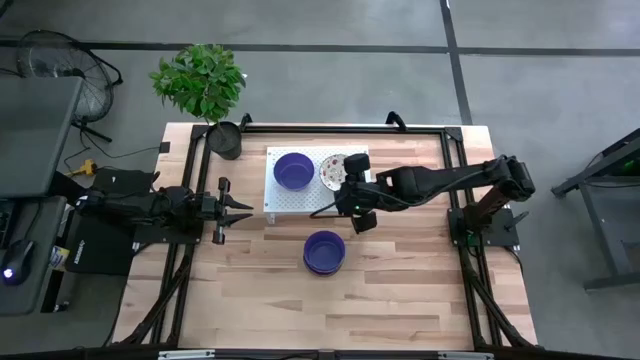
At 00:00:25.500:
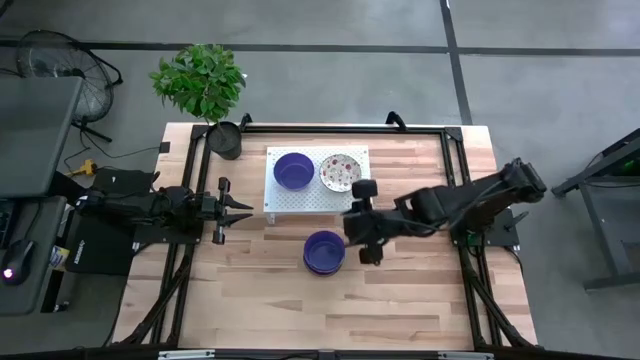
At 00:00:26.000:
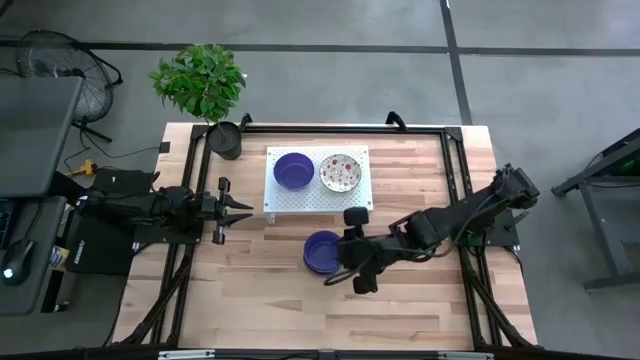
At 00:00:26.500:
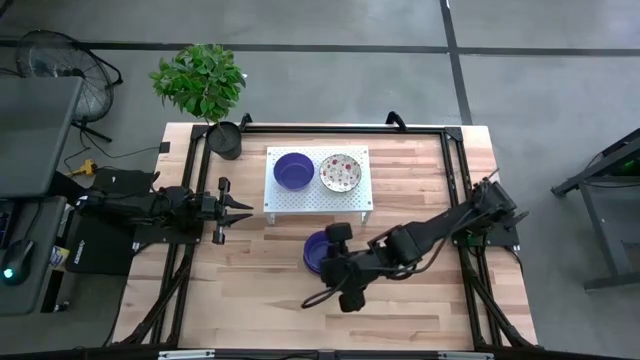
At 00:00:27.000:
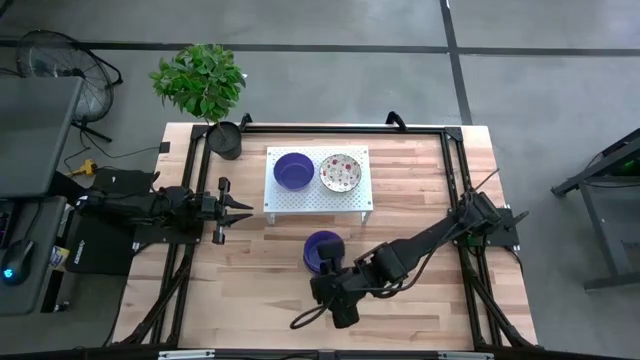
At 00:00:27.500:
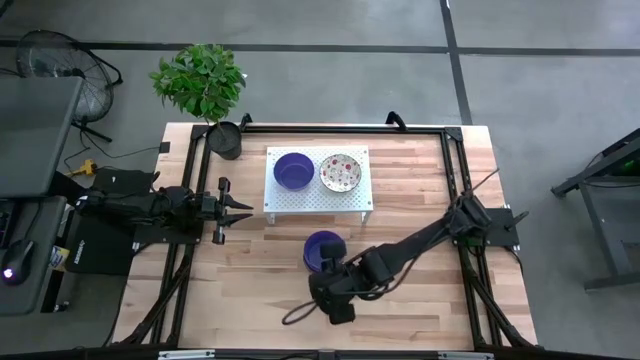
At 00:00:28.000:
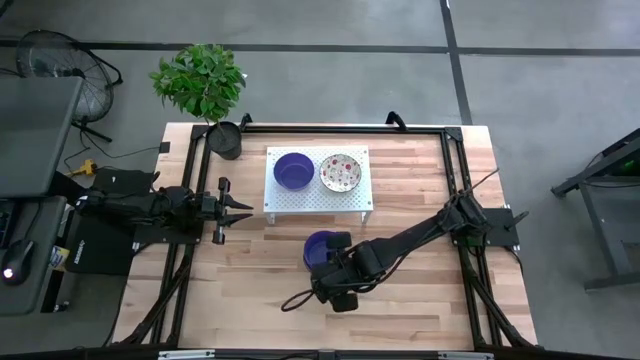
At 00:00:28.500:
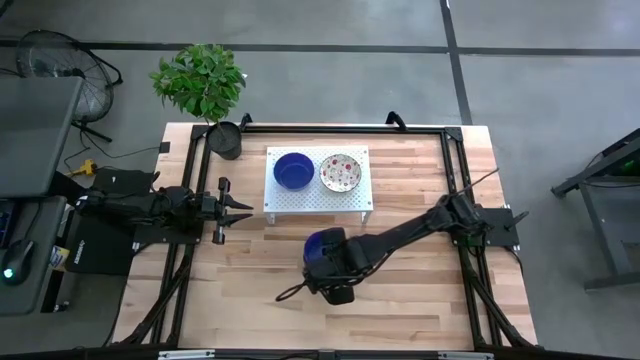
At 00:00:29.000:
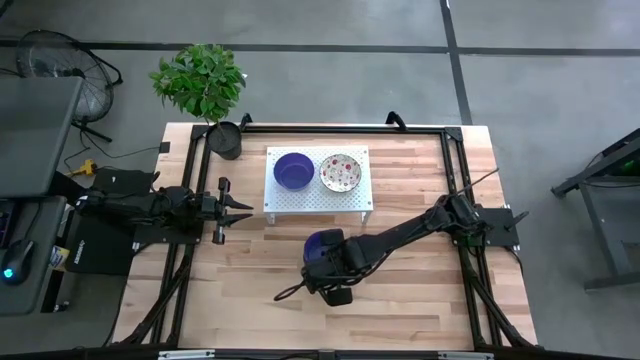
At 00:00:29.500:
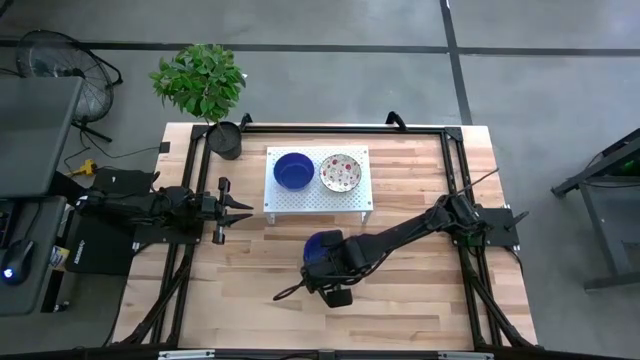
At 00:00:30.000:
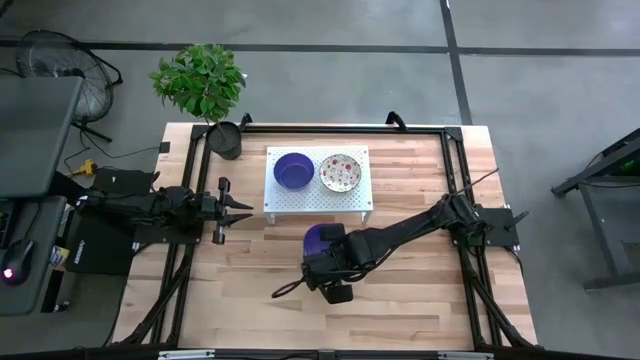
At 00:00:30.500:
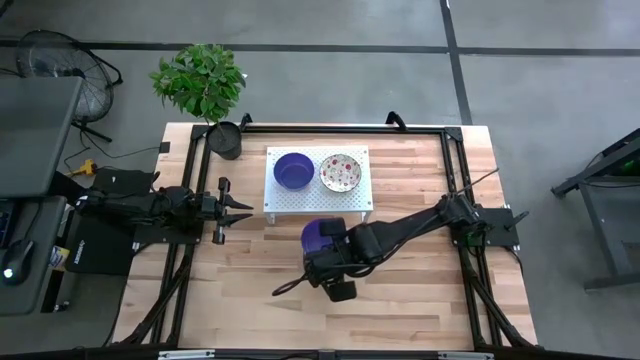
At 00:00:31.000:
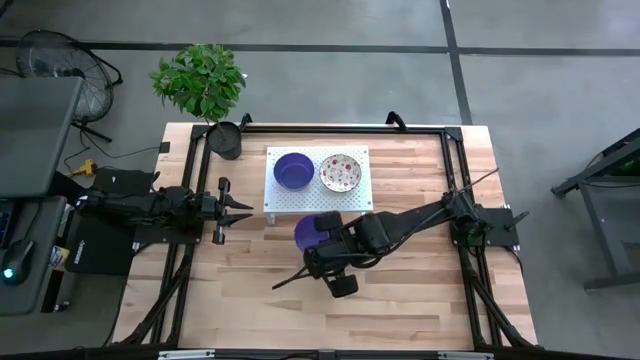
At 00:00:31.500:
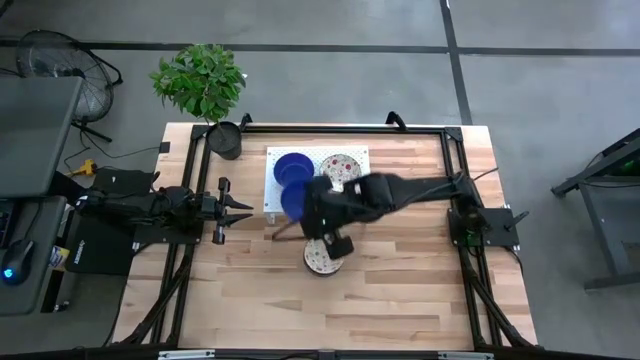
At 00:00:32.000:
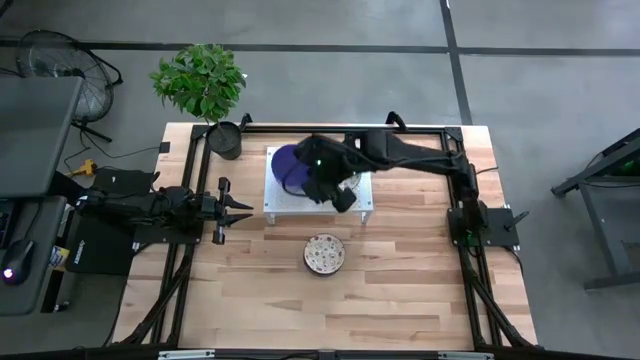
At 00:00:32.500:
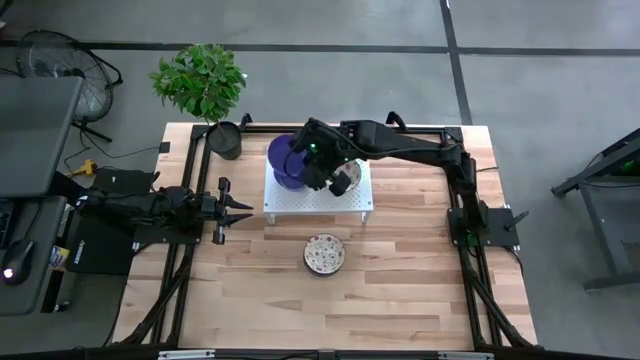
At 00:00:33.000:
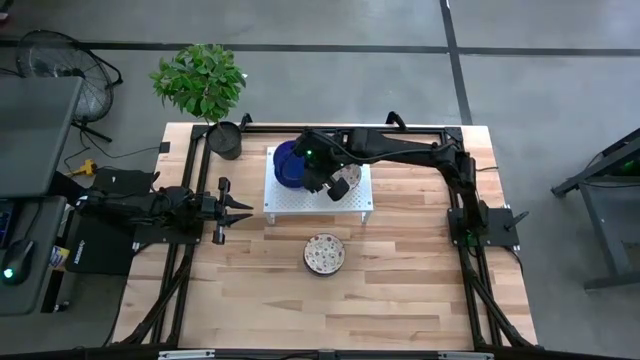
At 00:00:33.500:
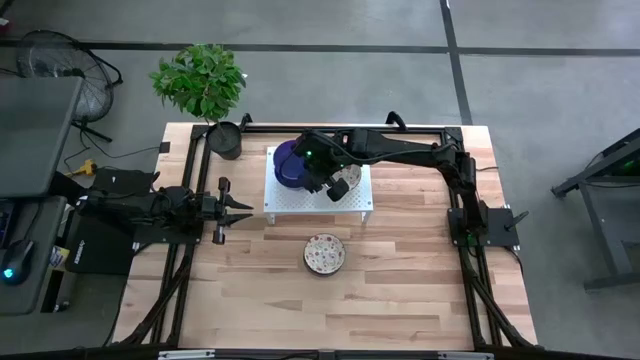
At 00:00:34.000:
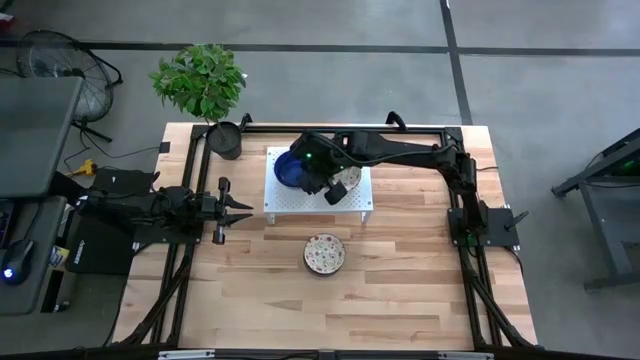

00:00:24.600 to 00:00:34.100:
Task: Pick & Place Mini bowls
Stack the violet bowl on top of the violet bowl on the shelf

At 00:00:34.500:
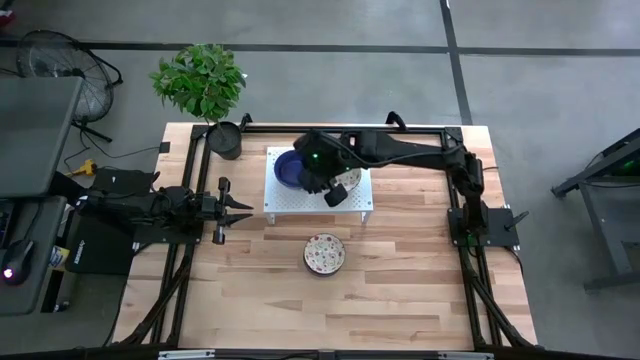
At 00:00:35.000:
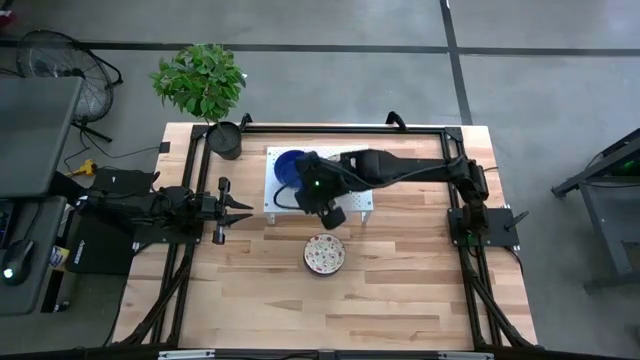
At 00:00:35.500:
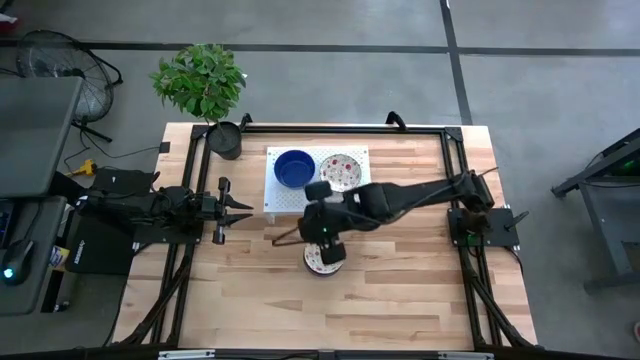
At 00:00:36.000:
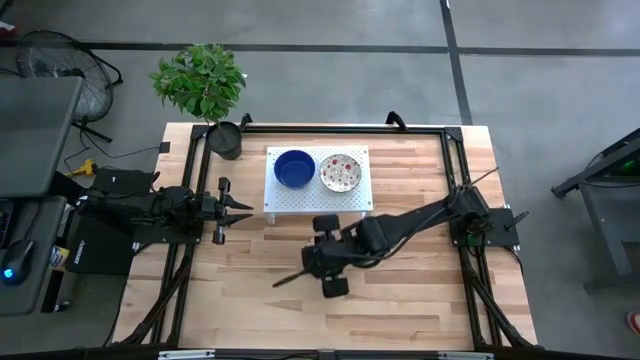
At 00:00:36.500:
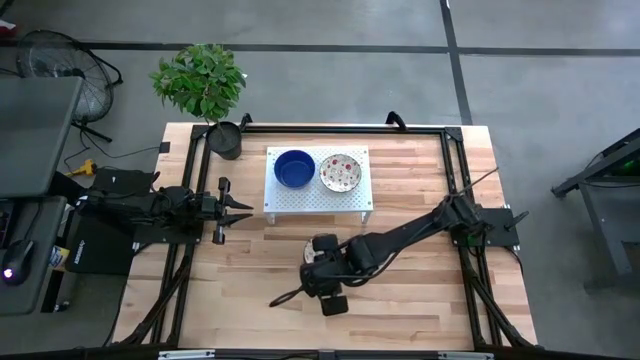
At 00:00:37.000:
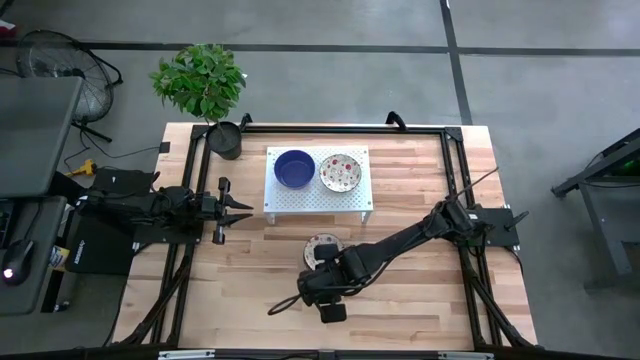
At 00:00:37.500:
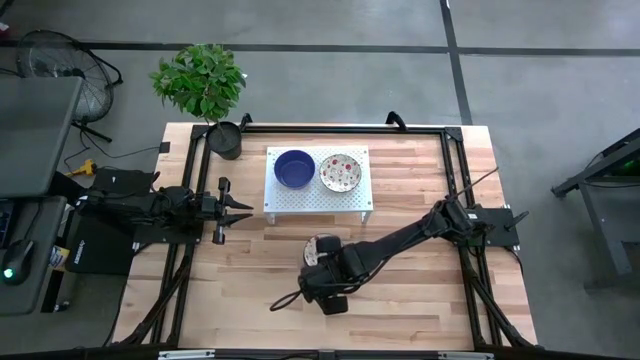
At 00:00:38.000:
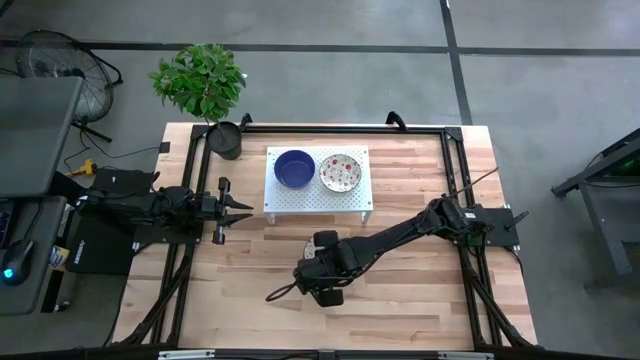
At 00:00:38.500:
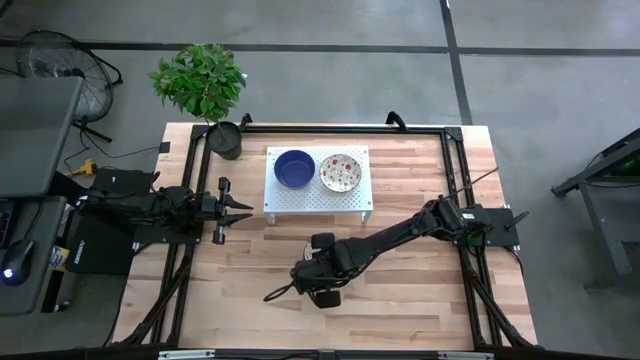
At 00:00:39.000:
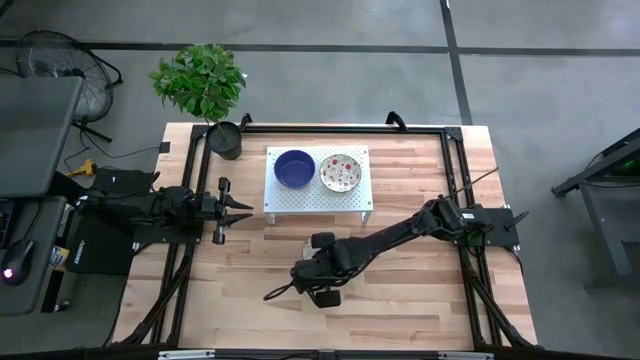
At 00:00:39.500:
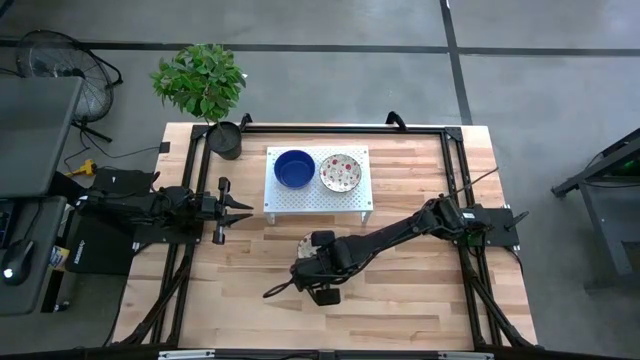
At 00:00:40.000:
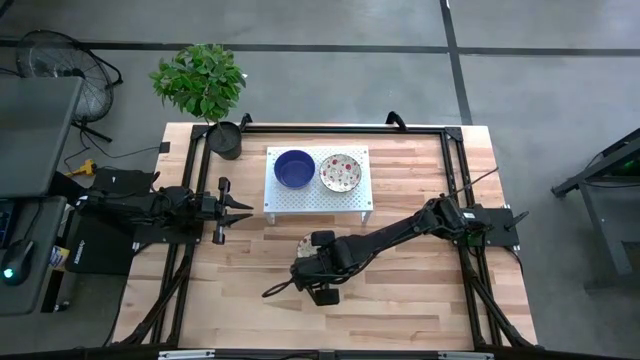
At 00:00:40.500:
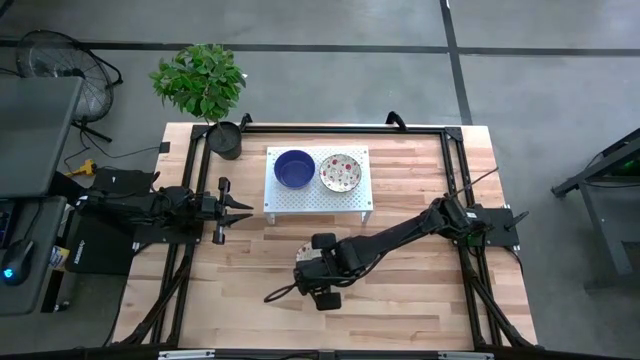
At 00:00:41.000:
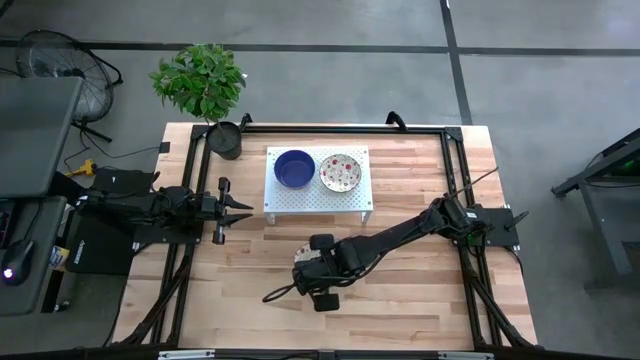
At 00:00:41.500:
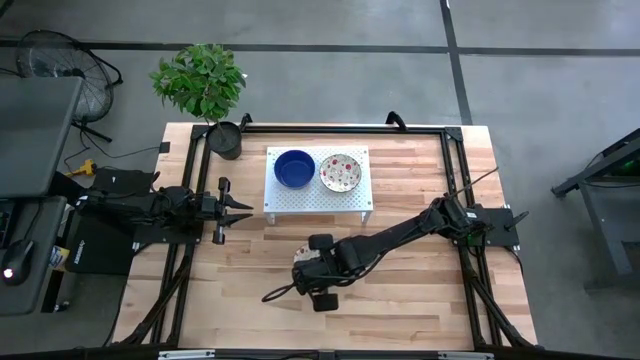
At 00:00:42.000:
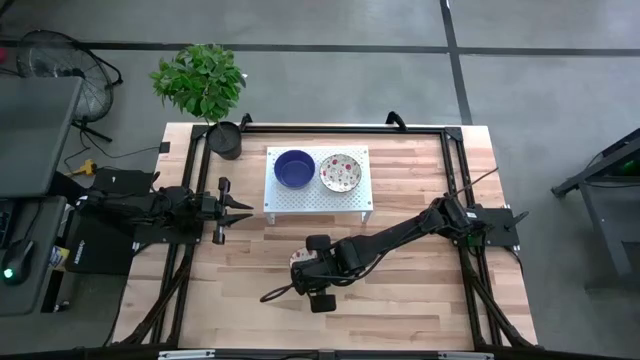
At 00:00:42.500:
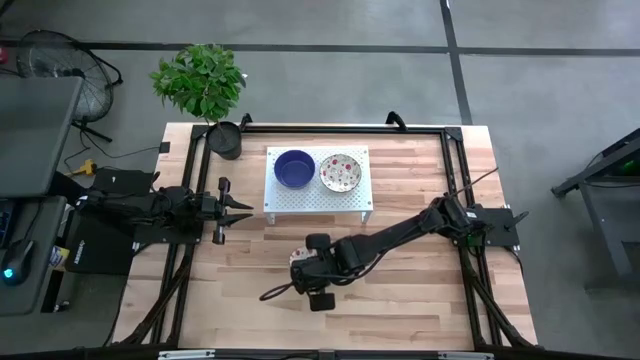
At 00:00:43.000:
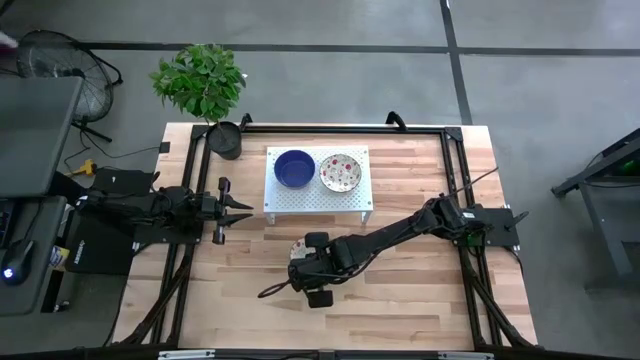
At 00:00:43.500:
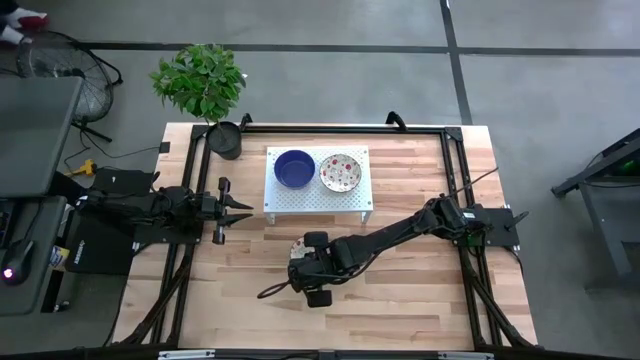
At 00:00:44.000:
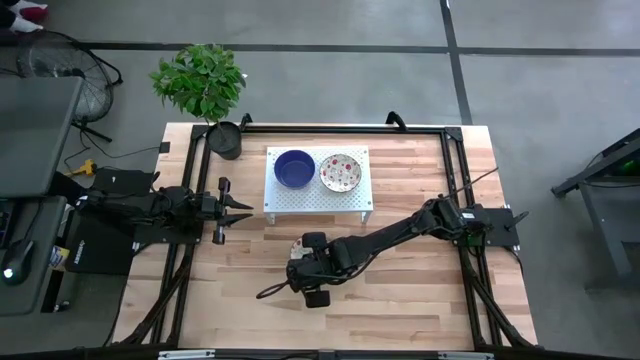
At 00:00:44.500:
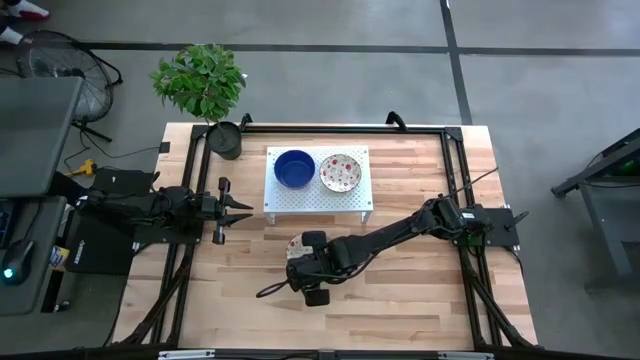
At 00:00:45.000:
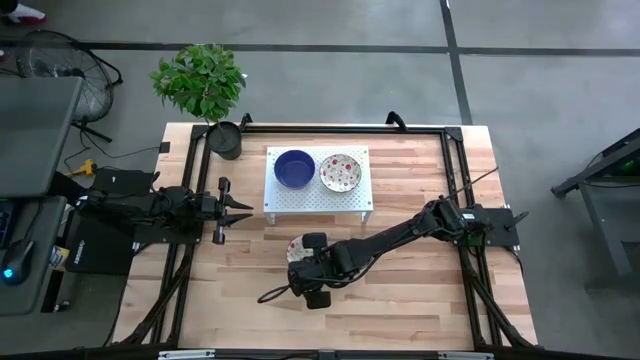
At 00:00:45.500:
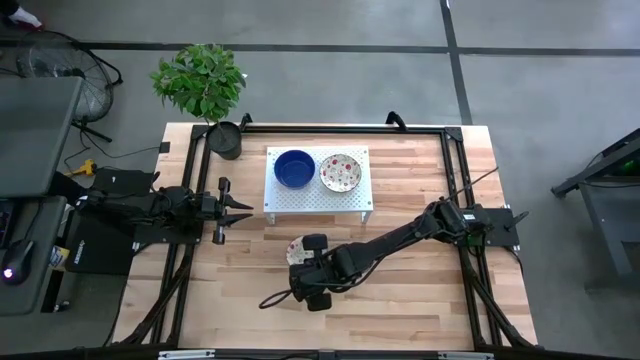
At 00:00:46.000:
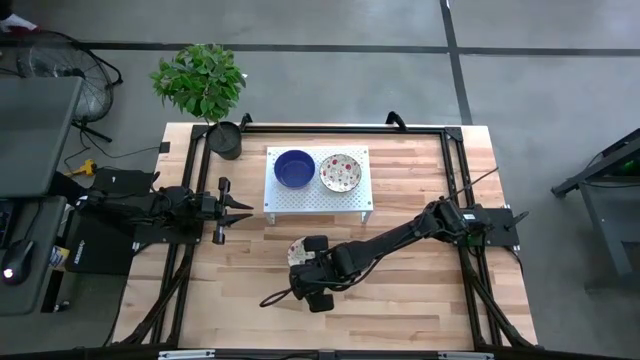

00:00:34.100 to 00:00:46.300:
Stack the red patterned bowl on top of the red patterned bowl on the shelf
